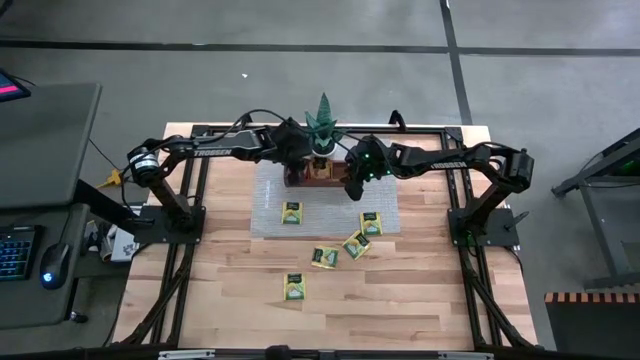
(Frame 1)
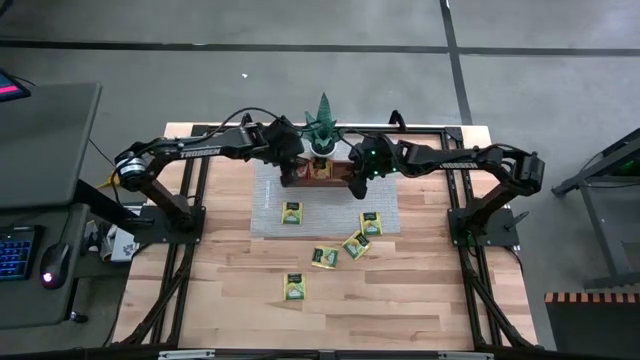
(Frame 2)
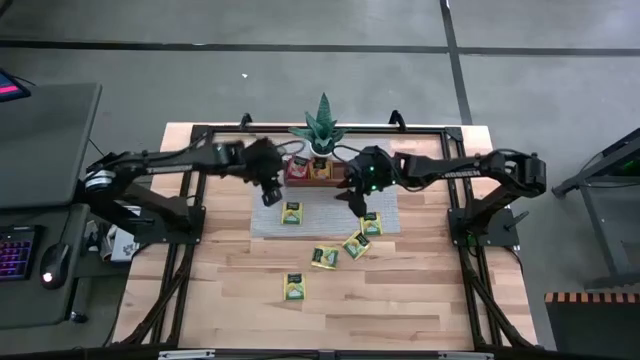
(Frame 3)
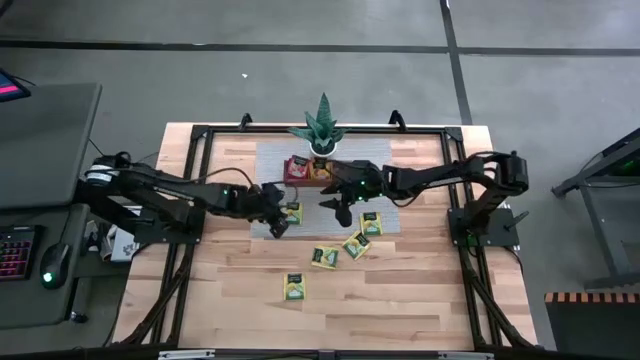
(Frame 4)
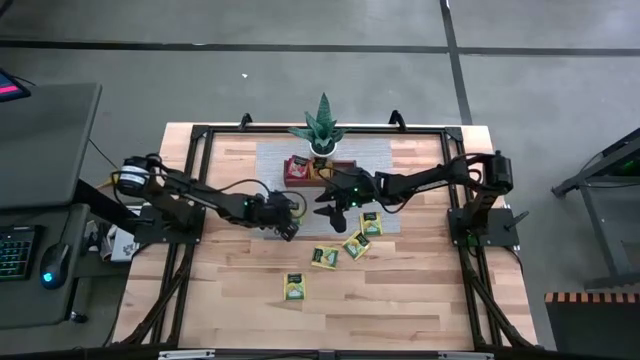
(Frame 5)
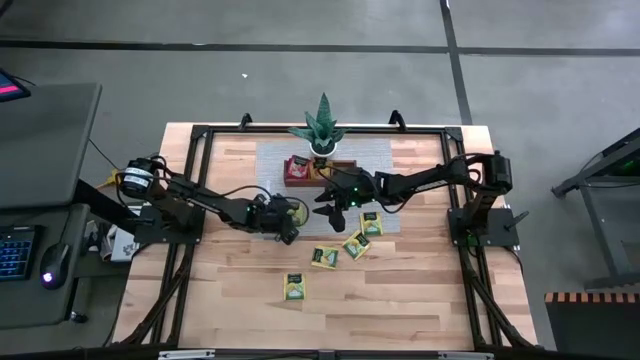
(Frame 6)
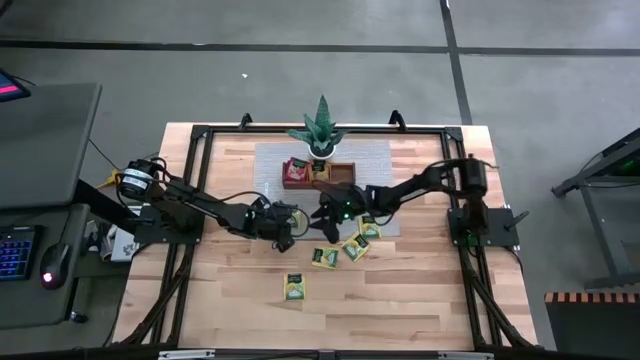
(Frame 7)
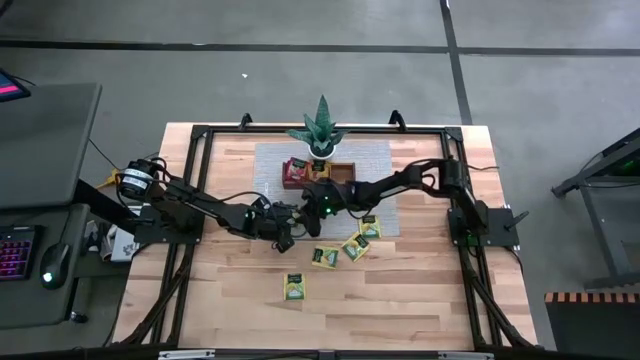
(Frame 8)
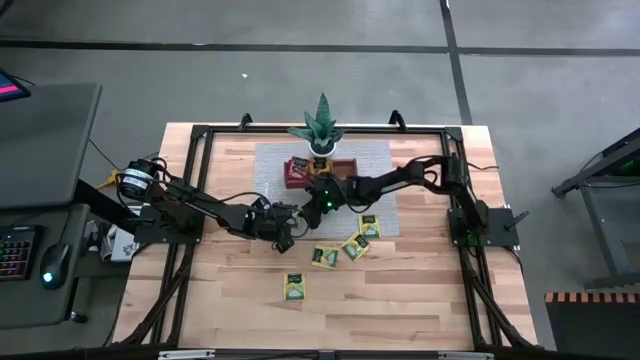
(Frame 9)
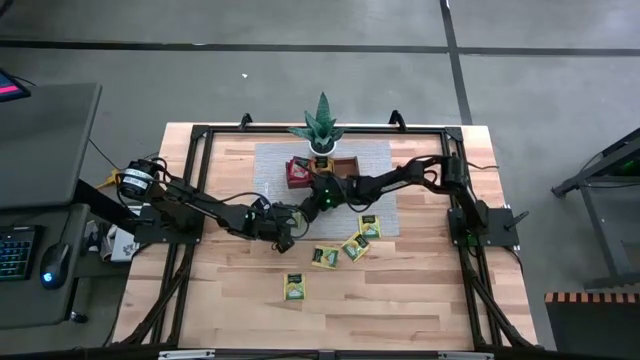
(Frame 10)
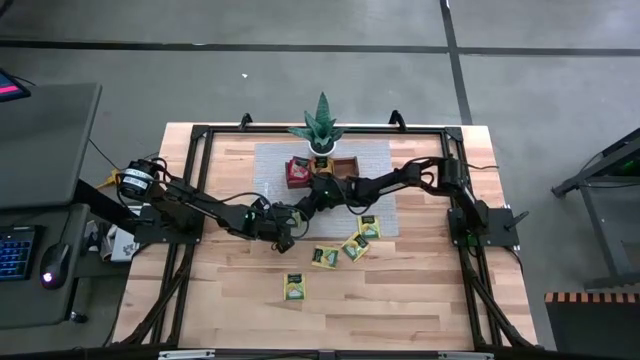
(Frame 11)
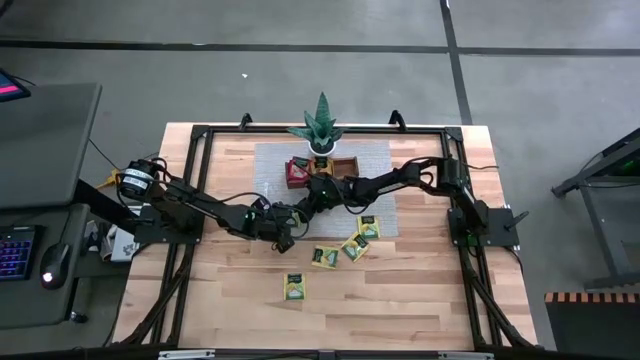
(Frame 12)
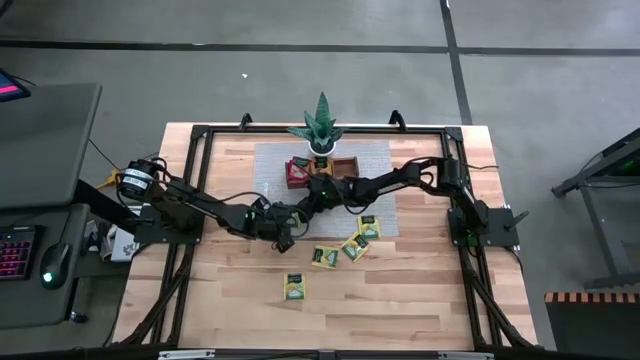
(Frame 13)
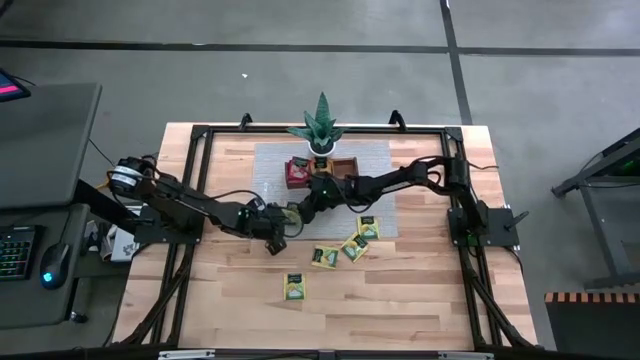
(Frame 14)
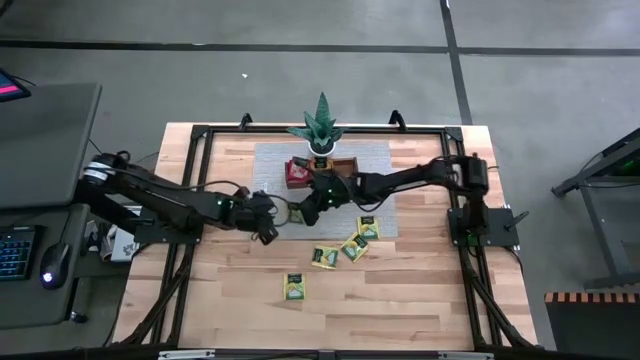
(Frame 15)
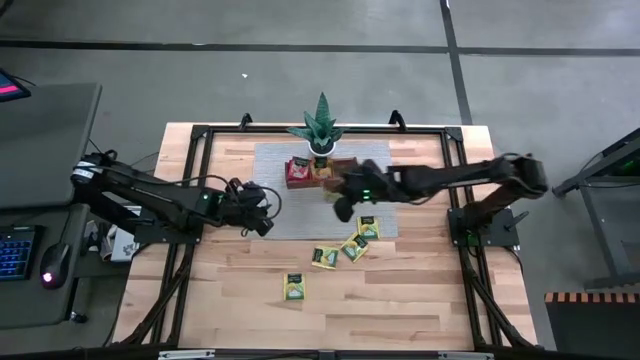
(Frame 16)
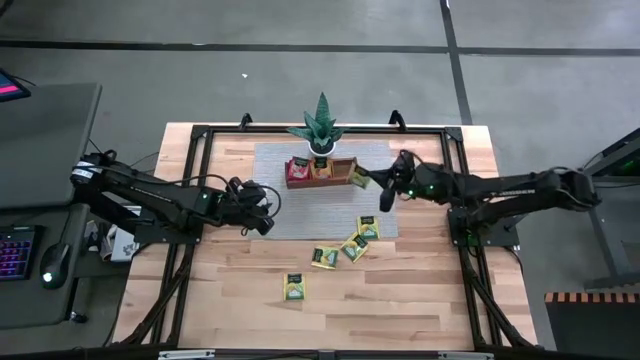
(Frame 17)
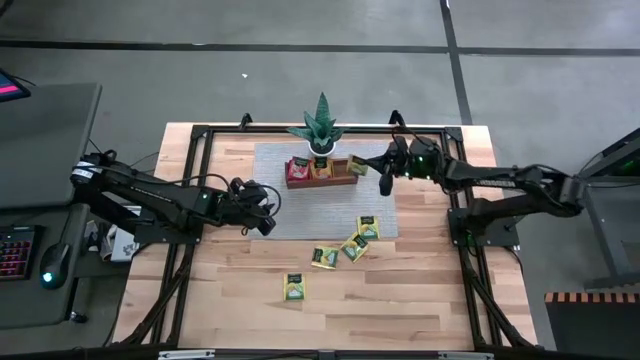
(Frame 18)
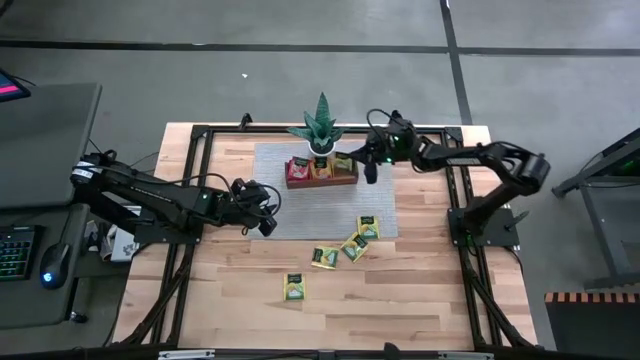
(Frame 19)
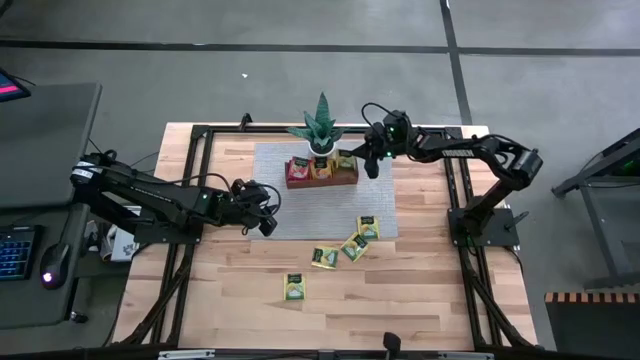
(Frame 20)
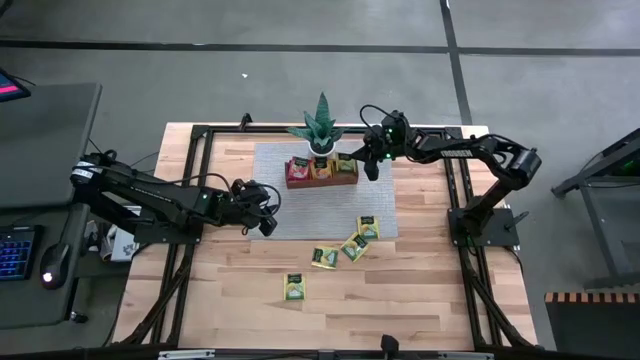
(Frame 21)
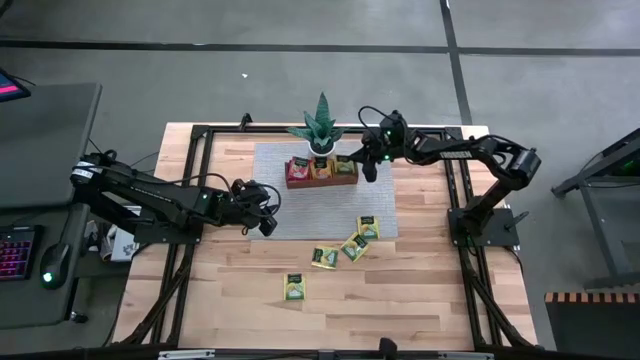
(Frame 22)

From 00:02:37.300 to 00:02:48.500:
Task: Pick & Place Tea
Put the yellow tea bag into the right section of the wooden organizer

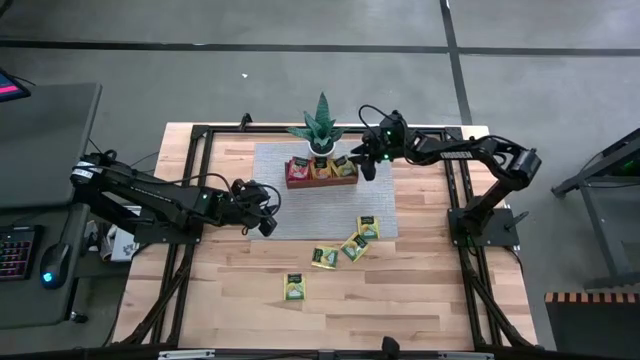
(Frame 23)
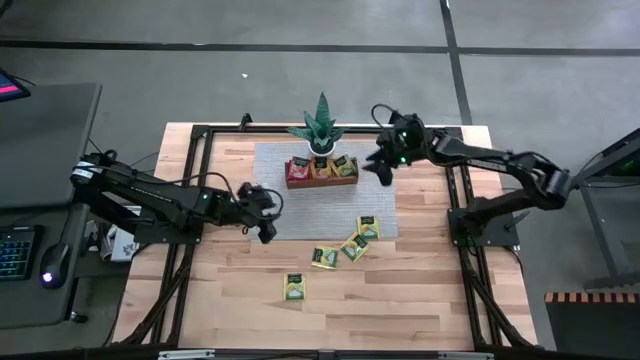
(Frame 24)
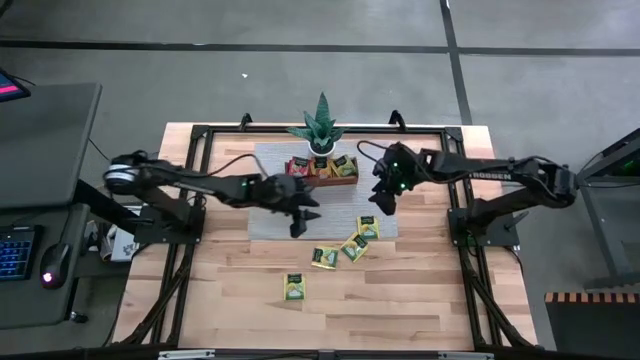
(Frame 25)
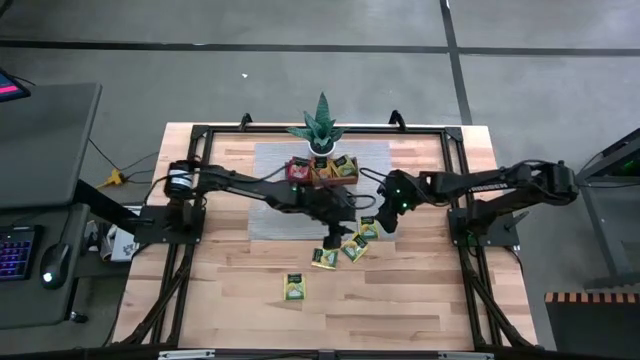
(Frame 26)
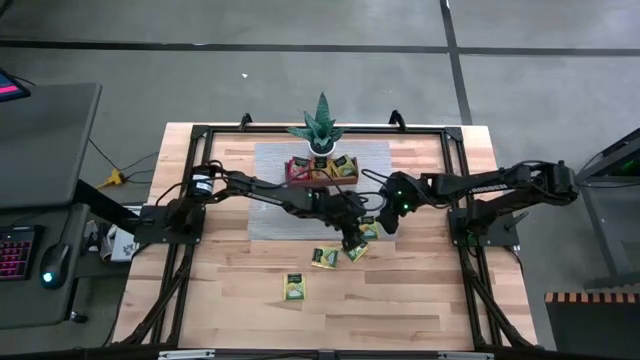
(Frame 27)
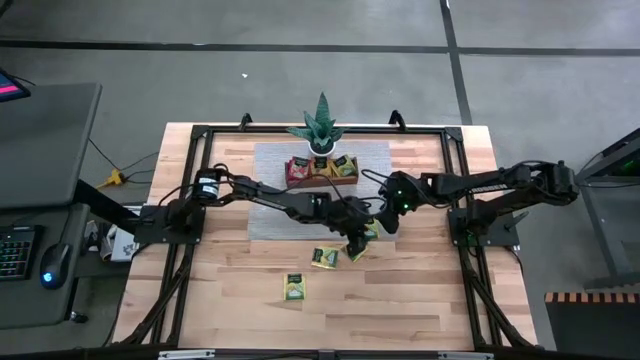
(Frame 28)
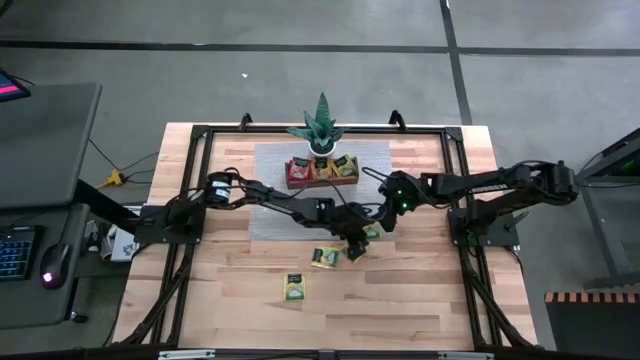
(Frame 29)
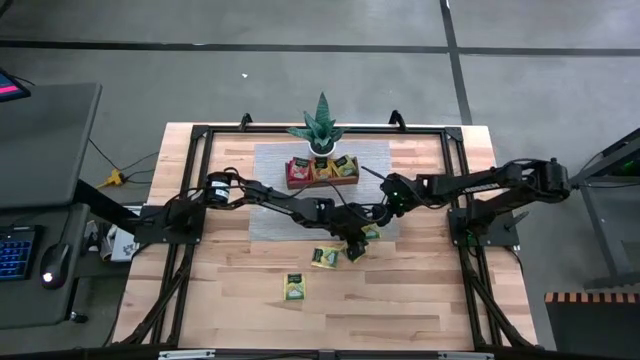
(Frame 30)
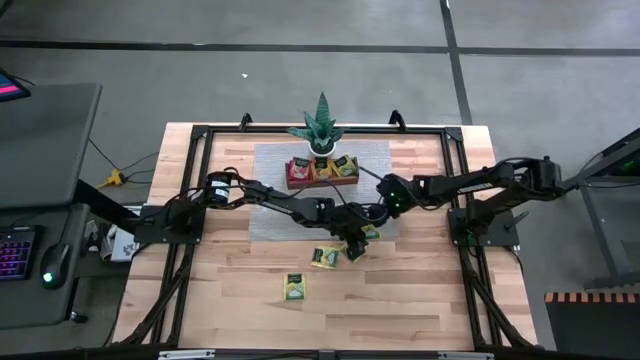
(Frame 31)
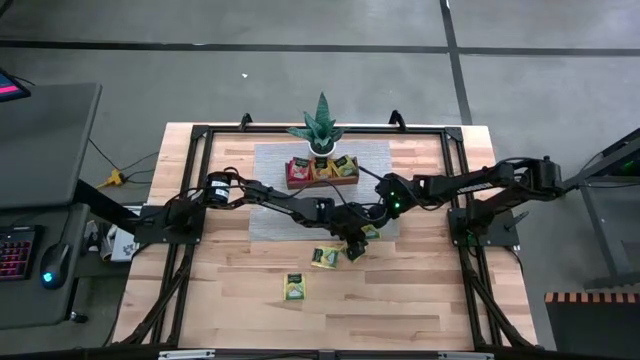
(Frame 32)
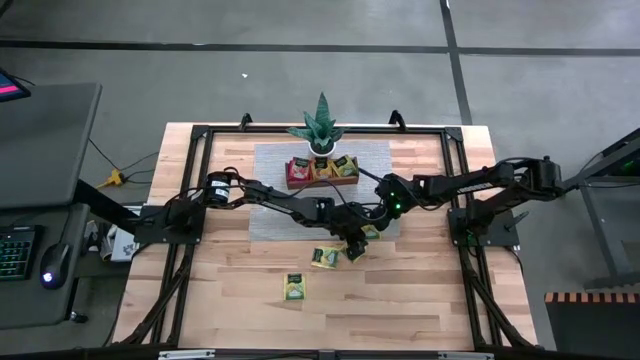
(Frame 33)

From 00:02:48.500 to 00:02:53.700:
Put the yellow tea bag into the right section of the wooden organizer

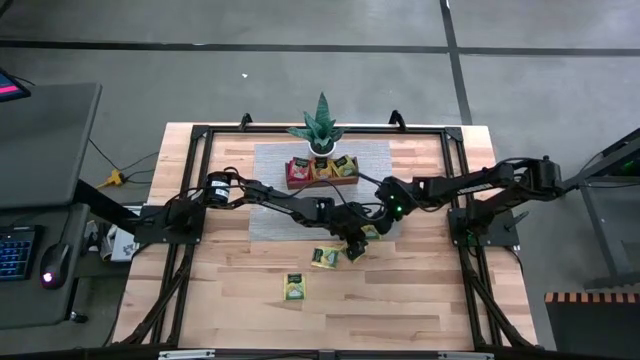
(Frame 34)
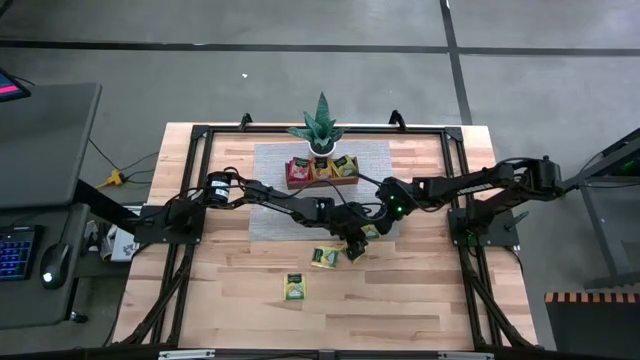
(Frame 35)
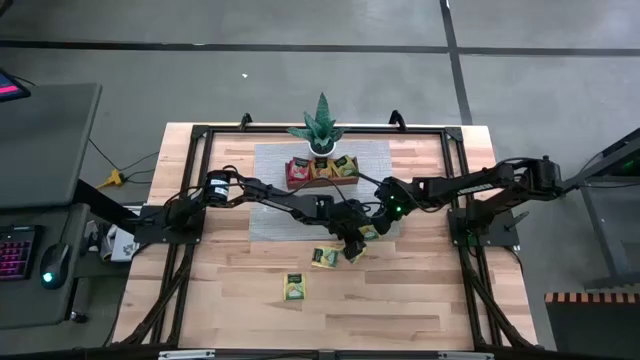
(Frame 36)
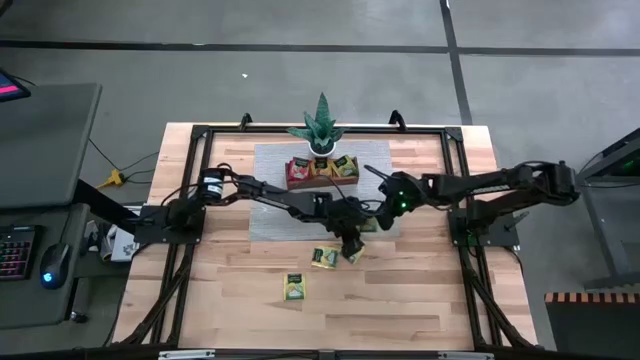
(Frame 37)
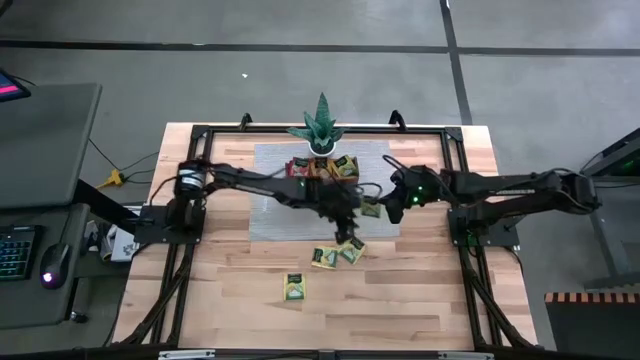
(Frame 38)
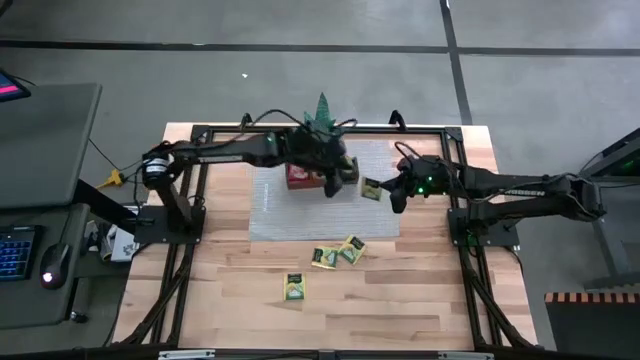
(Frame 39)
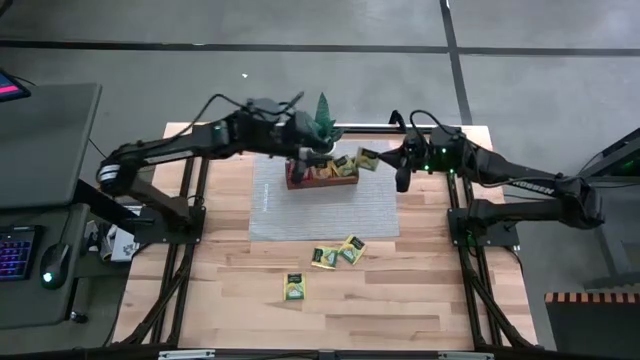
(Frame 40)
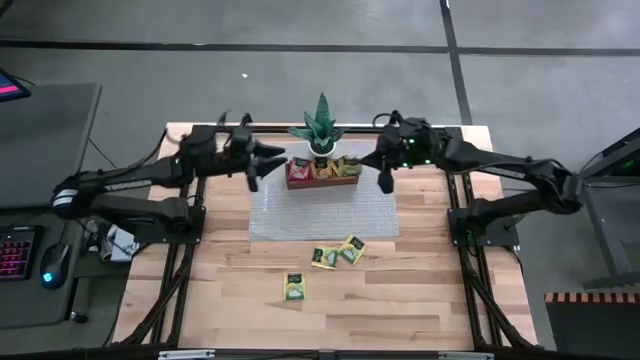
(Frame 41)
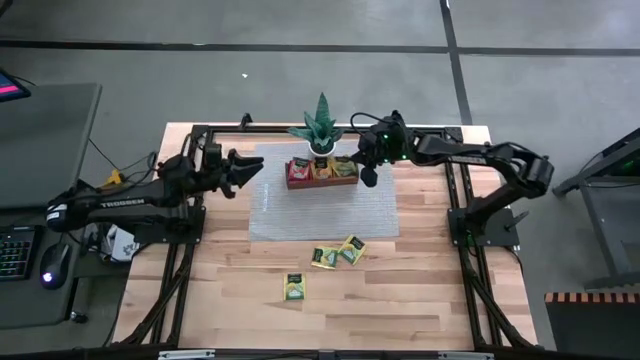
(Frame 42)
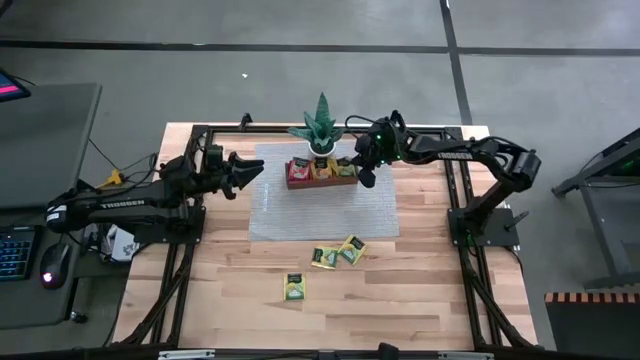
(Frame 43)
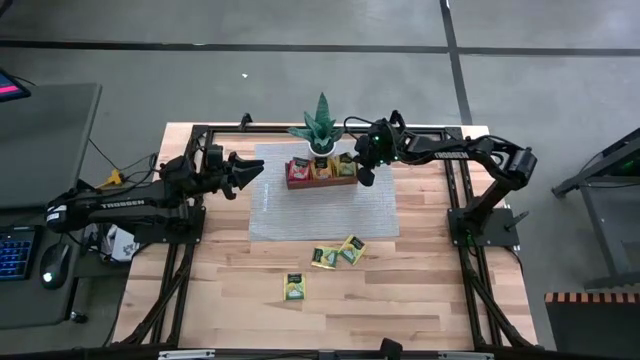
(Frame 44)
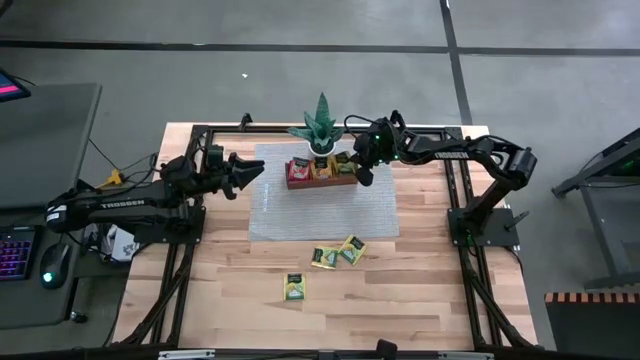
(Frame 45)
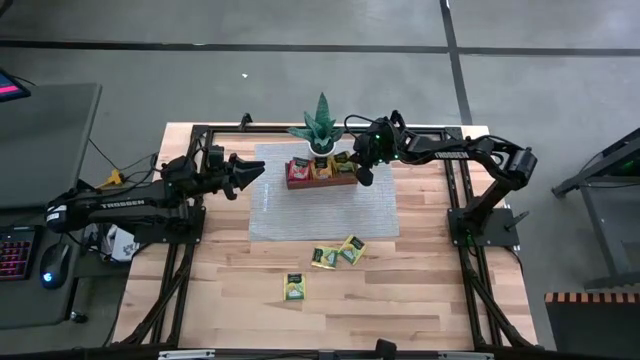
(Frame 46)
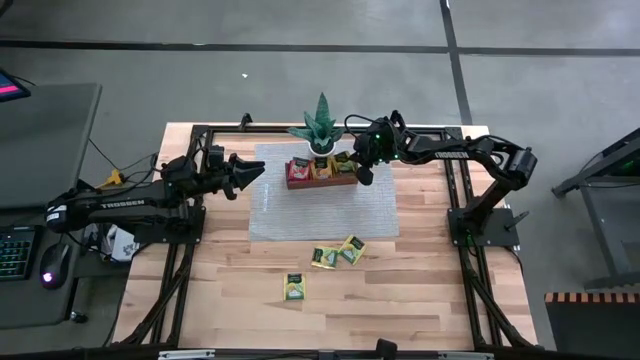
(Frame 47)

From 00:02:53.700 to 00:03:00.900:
Put the yellow tea bag into the right section of the wooden organizer
